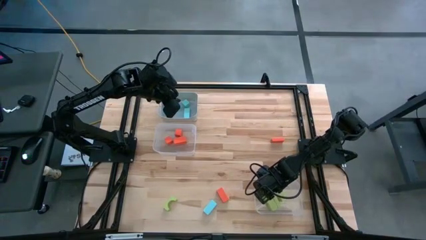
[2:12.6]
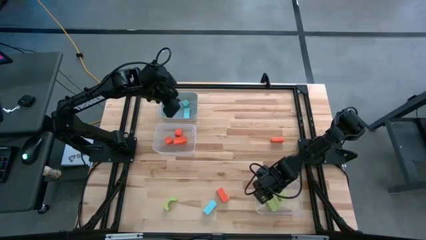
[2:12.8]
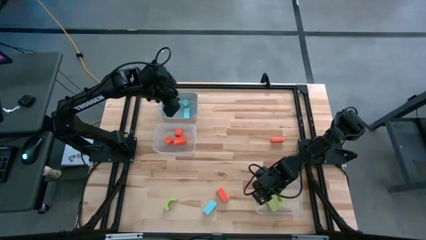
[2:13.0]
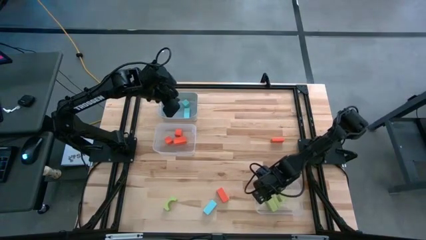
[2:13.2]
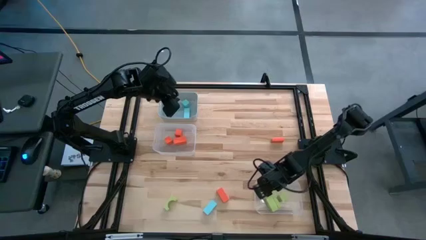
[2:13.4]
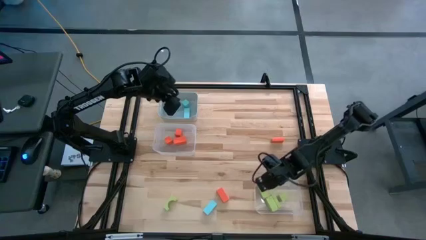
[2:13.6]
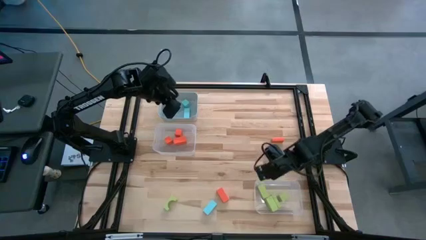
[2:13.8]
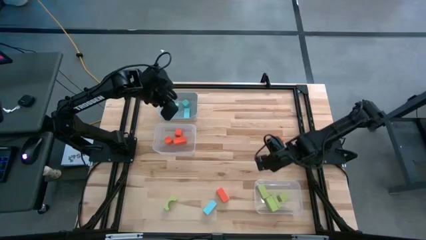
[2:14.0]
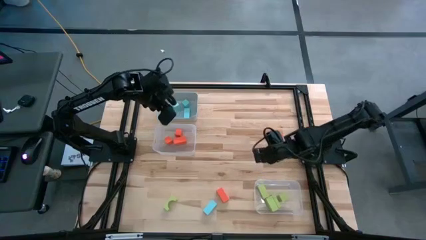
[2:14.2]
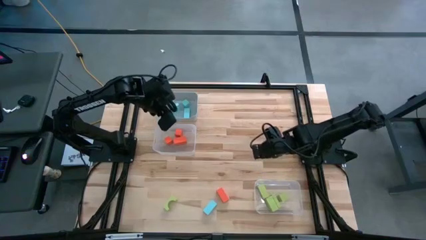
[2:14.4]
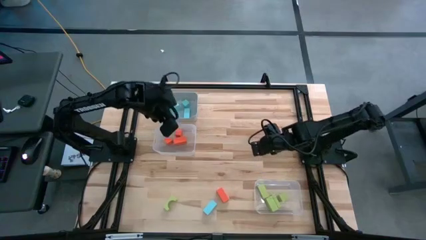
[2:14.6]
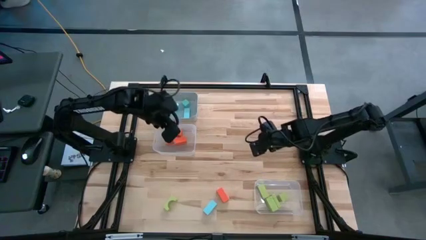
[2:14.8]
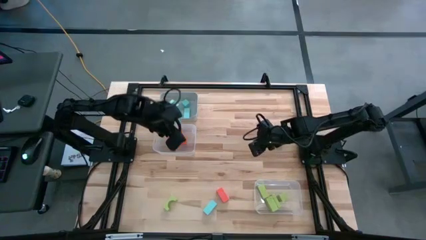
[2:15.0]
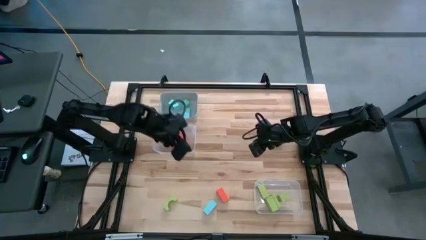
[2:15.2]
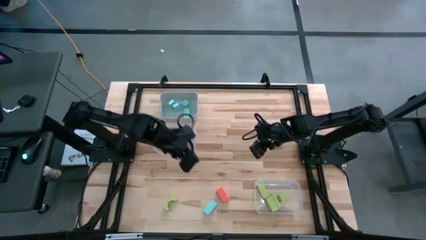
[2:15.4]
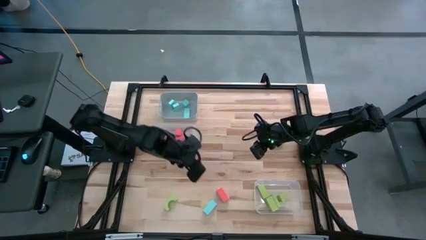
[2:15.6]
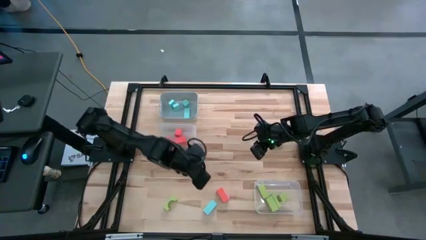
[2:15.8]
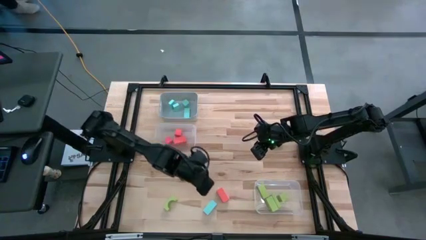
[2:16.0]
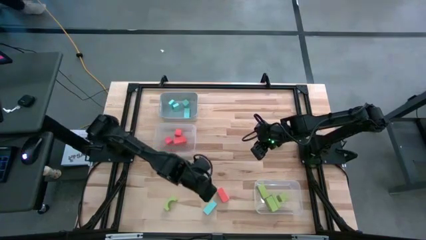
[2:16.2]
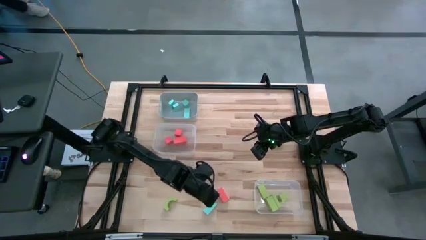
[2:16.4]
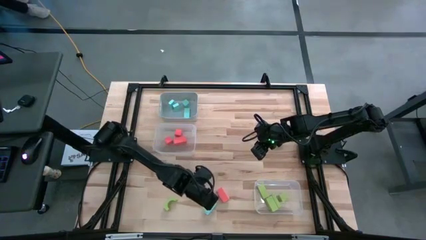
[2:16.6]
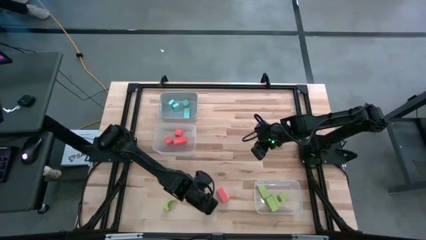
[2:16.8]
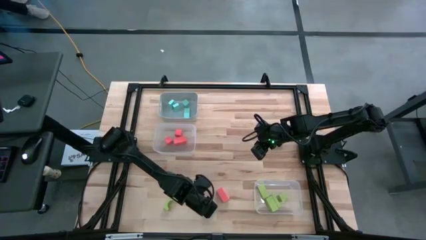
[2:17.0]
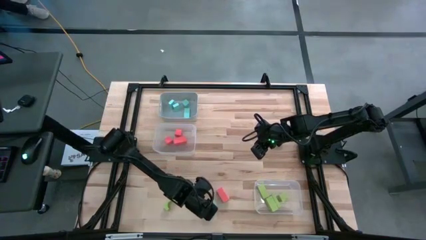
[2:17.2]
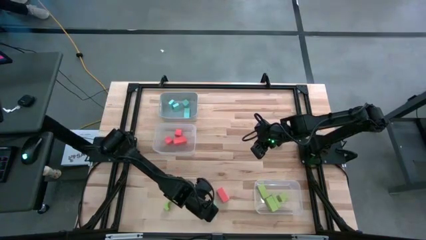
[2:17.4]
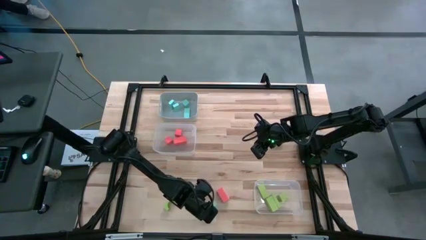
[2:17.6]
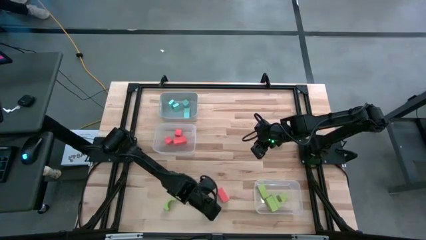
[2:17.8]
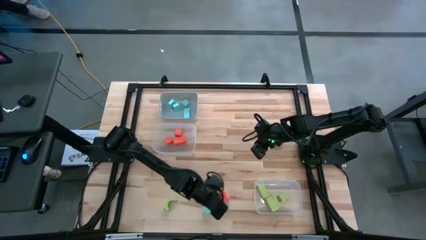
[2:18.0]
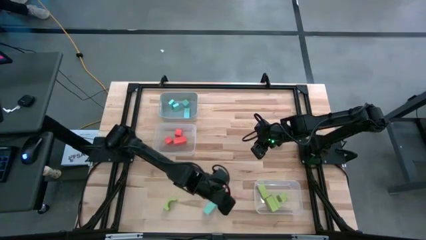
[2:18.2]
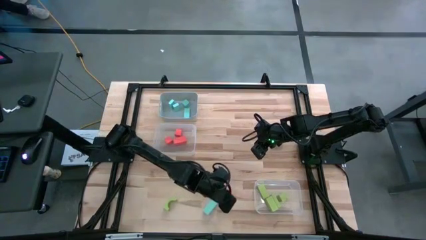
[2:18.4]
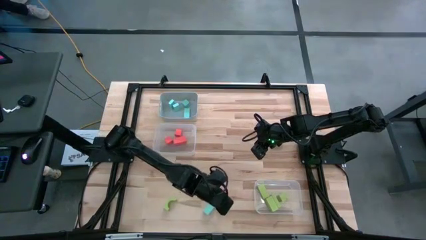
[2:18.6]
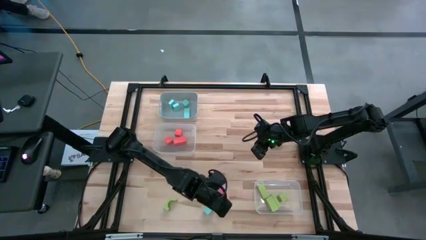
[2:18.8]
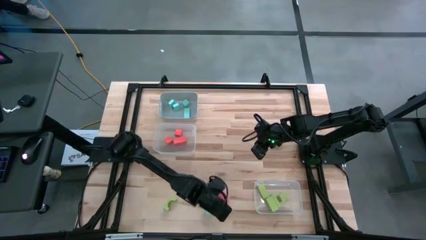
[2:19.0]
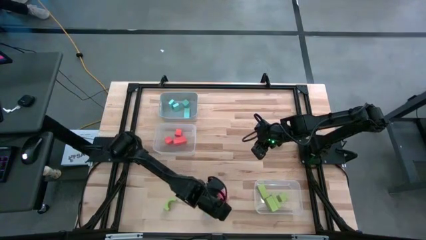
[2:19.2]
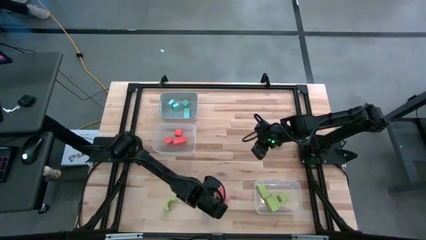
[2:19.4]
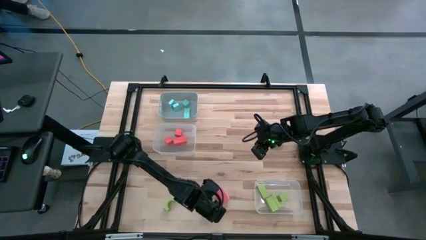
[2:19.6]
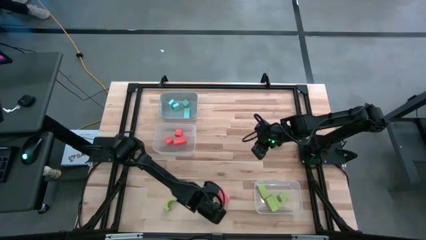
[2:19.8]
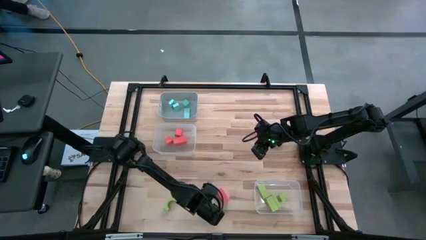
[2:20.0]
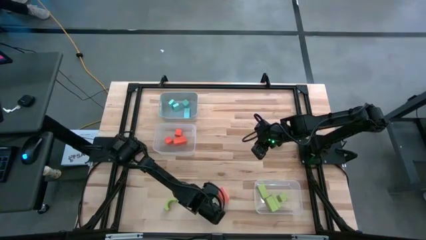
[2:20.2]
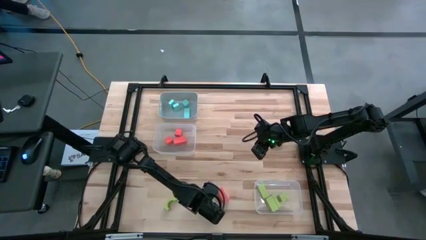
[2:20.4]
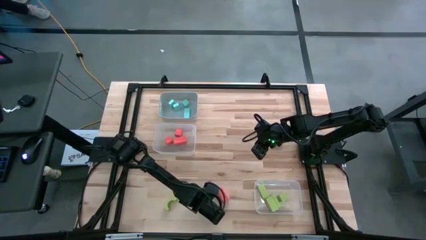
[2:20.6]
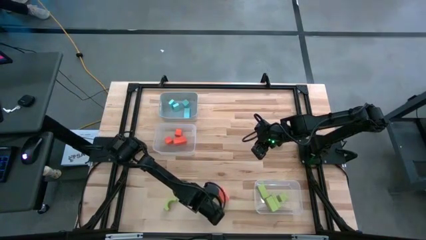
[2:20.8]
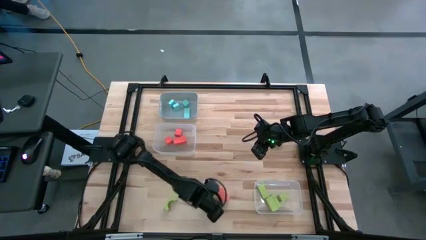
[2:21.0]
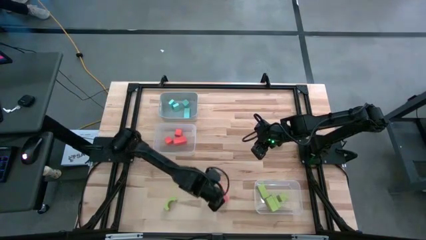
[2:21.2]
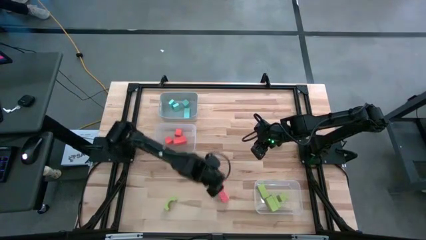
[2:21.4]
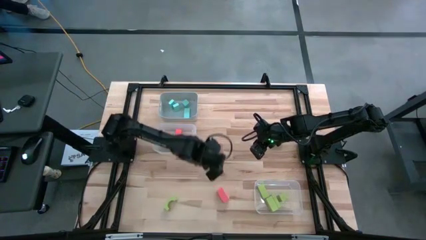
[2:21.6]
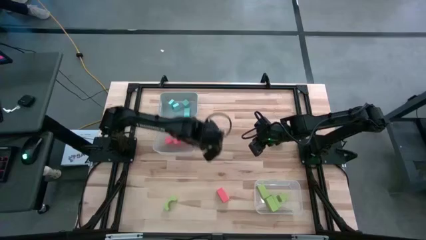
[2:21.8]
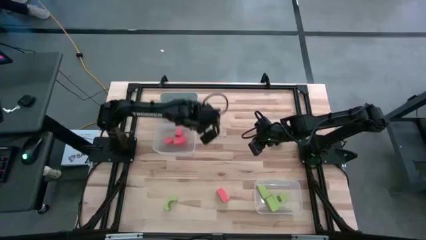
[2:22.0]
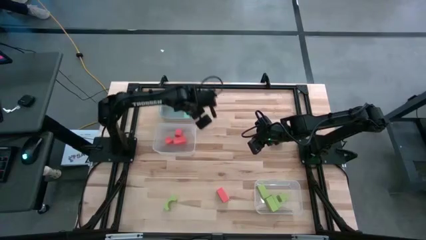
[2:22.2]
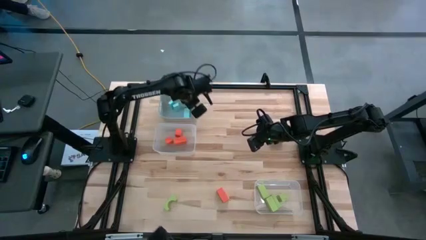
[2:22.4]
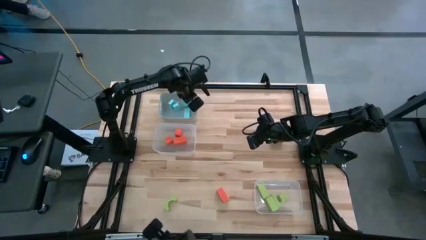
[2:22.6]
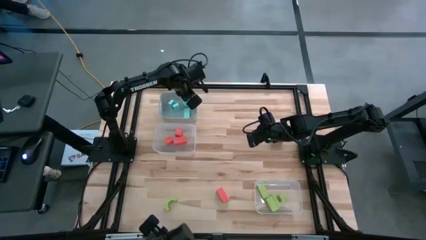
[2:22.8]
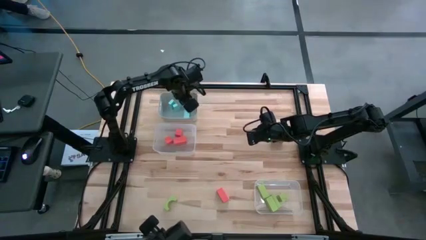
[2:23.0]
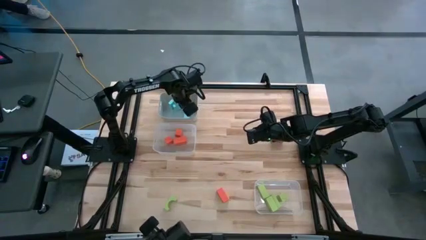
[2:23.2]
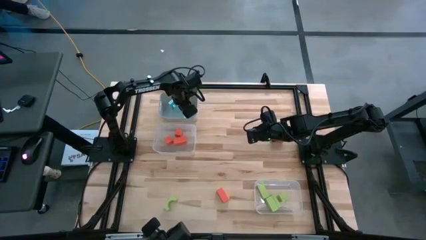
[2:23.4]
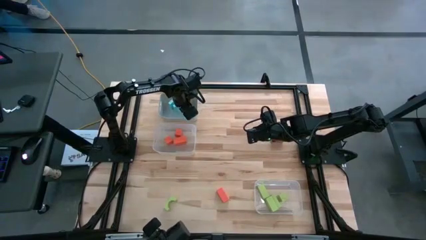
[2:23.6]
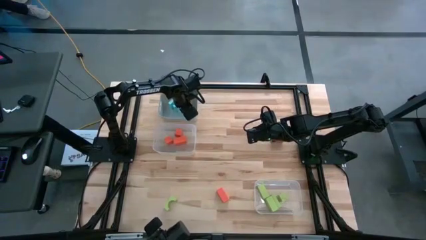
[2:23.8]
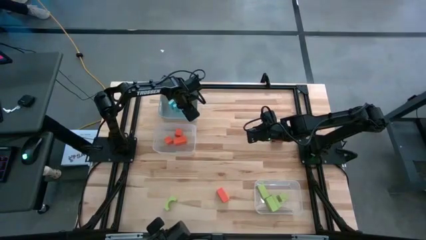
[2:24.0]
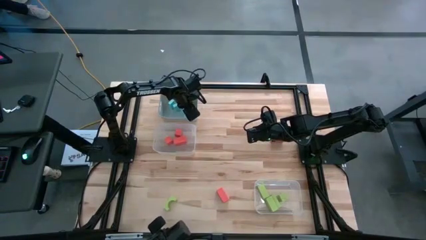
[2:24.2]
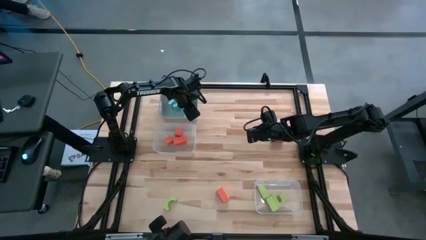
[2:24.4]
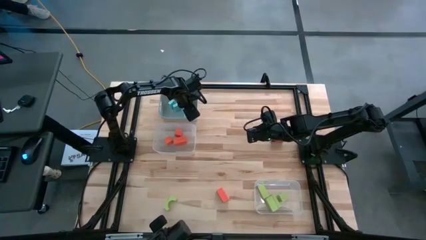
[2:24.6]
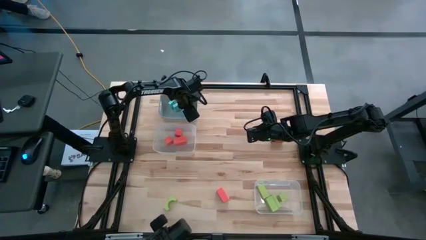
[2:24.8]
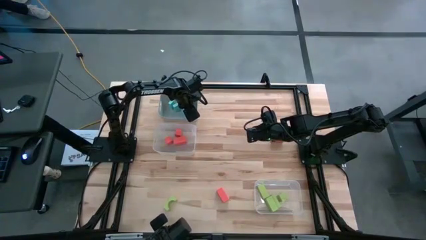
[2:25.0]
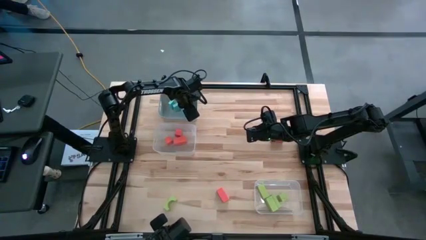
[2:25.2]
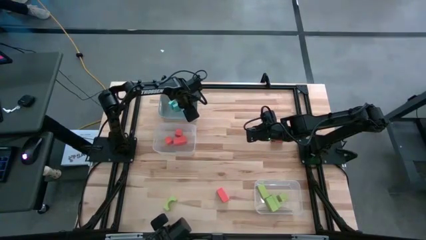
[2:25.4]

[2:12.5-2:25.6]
Task: Sort & place blocks by color
Put the blue block into the gray bin

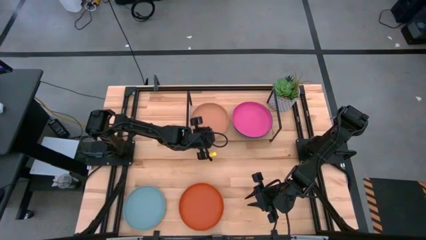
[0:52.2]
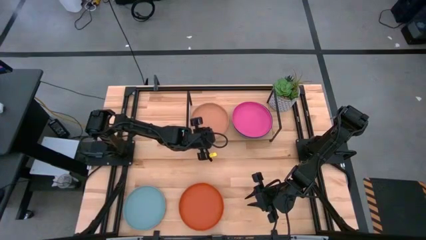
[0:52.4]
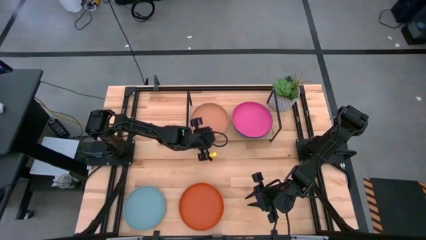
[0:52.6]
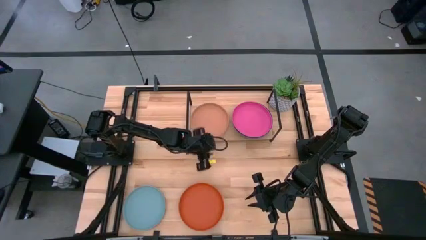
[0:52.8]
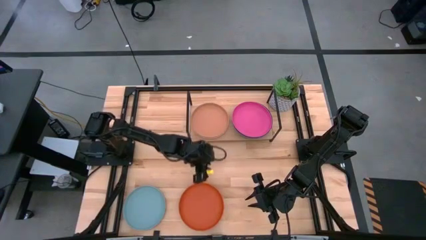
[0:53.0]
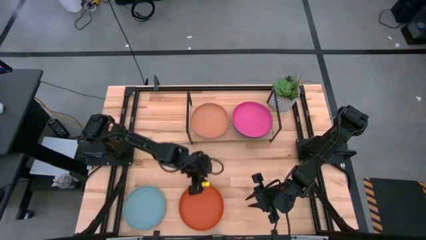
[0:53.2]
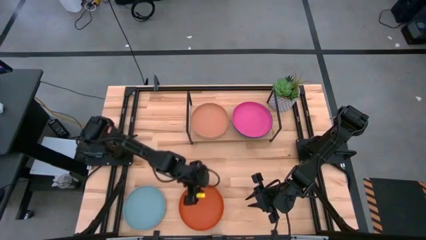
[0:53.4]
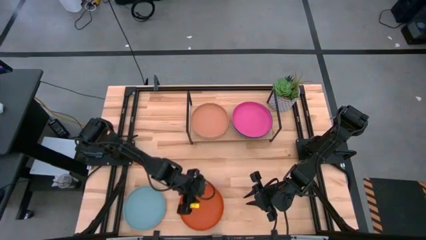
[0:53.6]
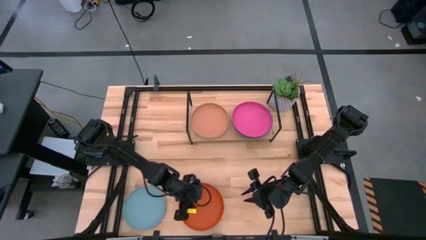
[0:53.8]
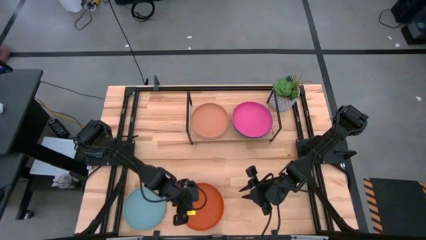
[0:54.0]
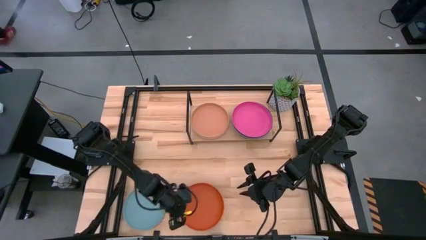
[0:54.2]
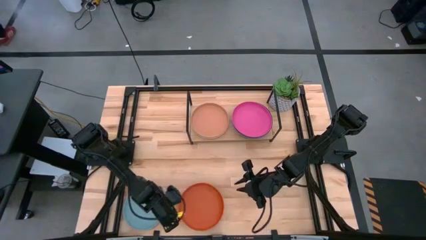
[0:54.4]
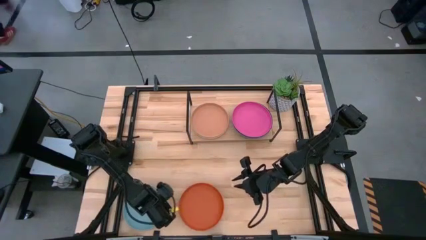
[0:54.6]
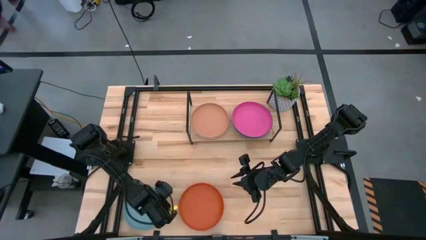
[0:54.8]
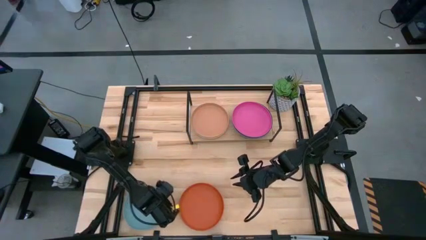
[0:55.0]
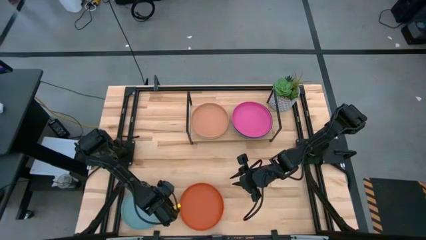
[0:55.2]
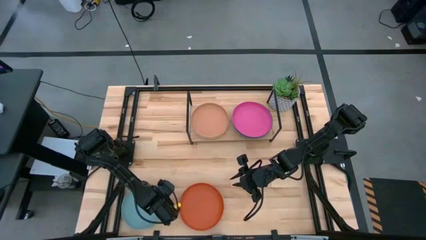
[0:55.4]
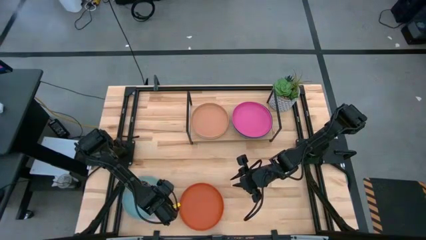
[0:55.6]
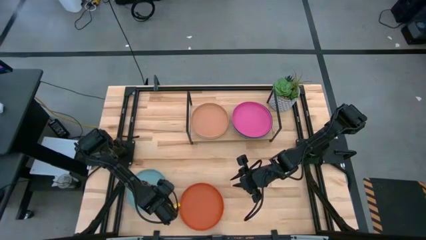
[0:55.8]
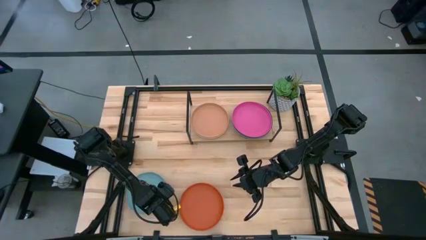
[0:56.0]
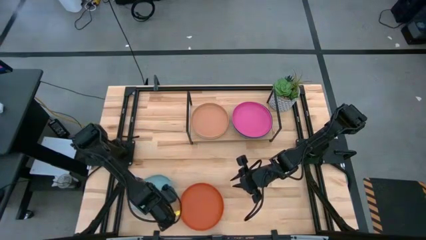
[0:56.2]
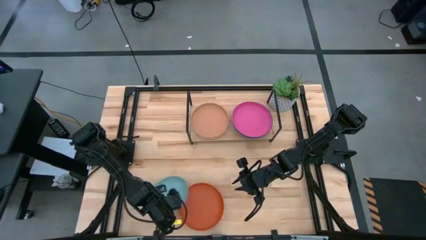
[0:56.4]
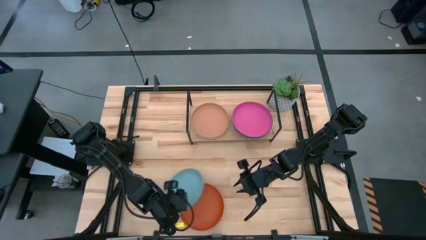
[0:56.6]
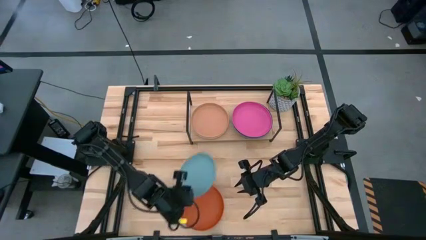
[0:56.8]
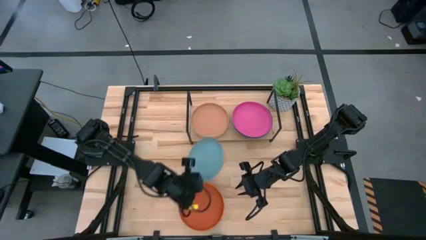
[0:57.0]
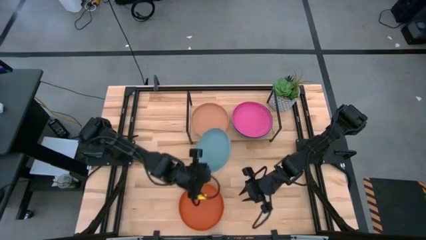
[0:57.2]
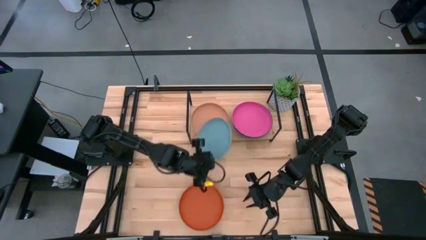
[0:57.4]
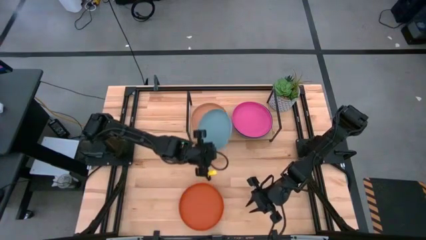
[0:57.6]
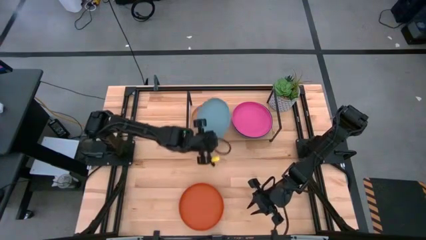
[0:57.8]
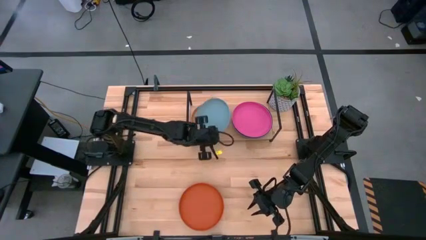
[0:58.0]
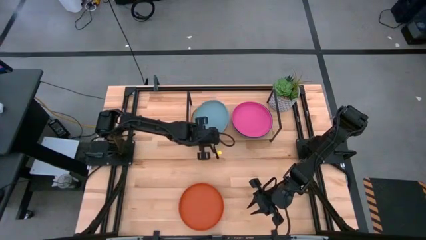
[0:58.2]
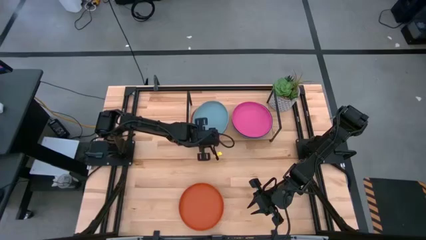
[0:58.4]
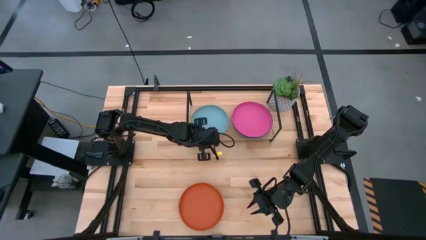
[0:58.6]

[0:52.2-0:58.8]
Task: Place and stack plates onto a shelf
Stack the light blue plate on top of the brown plate on the shelf
